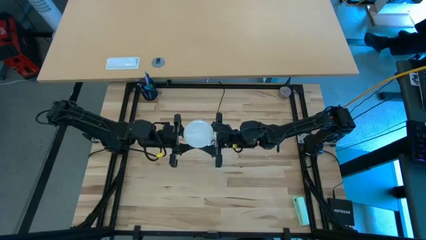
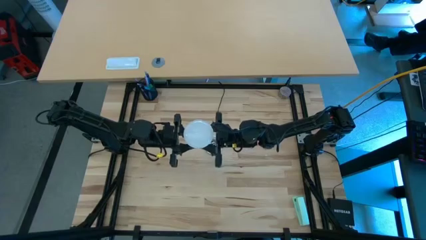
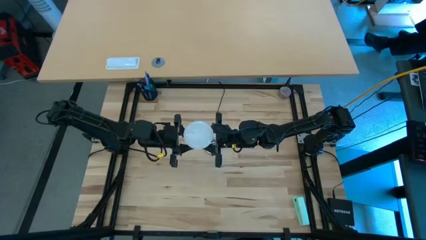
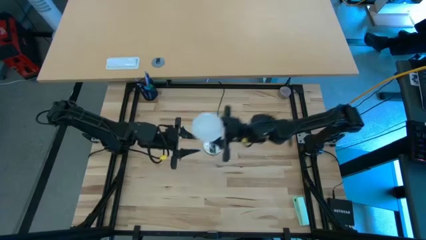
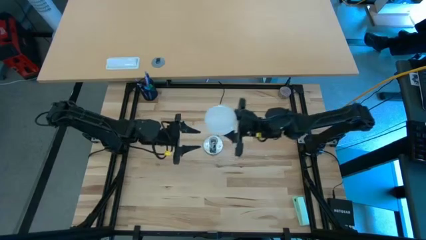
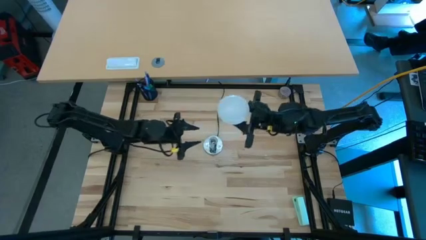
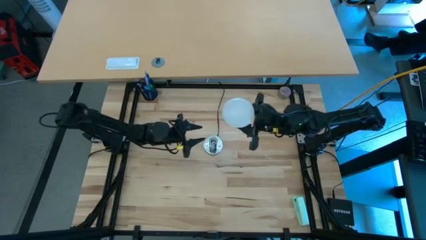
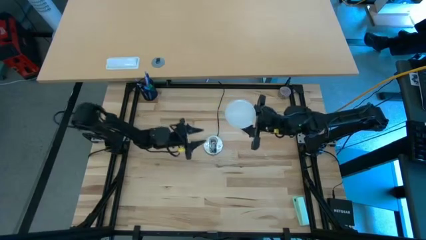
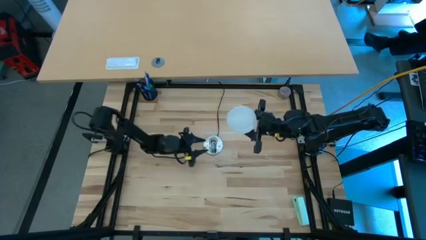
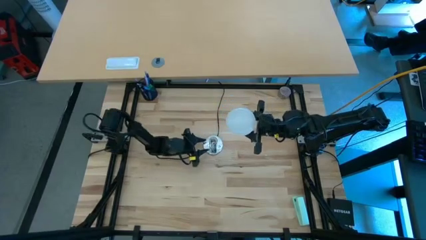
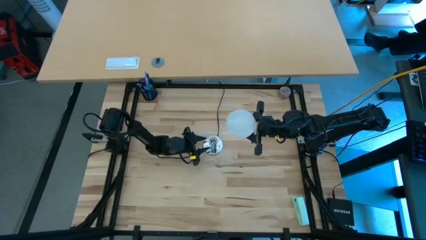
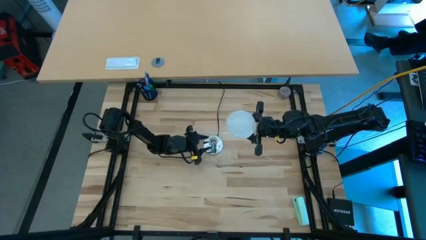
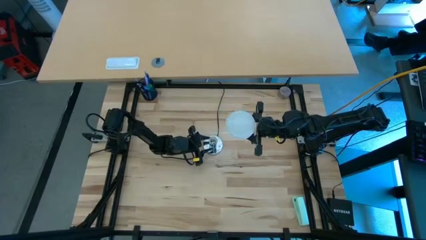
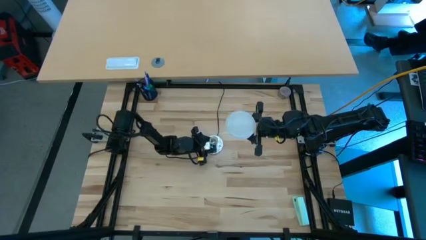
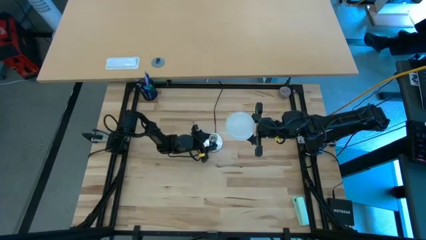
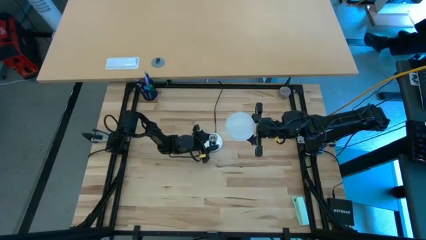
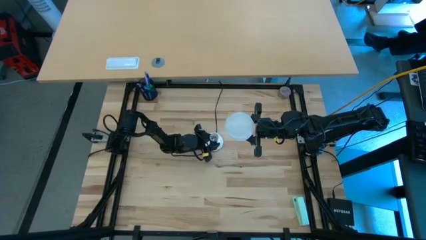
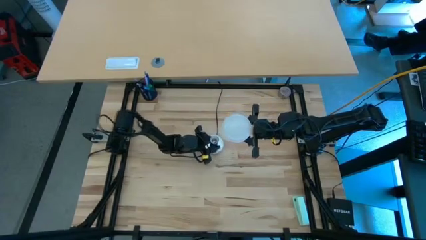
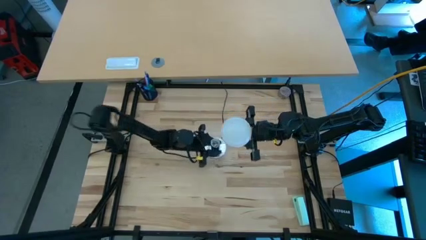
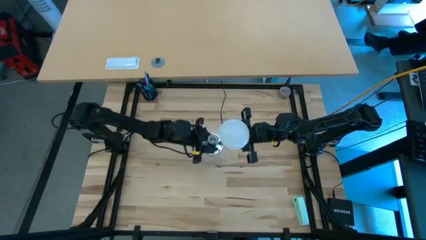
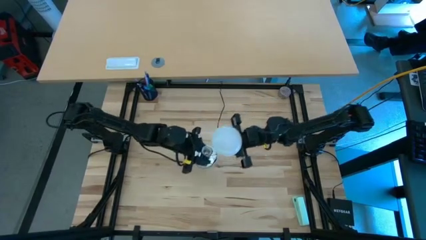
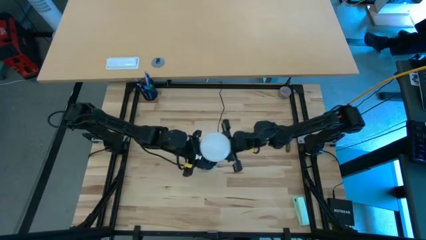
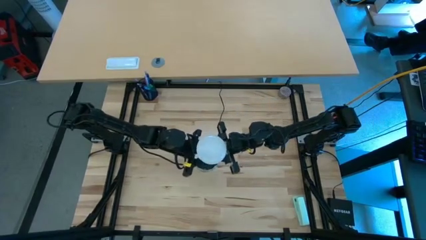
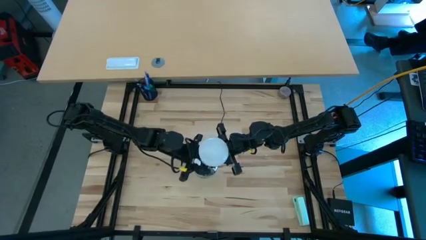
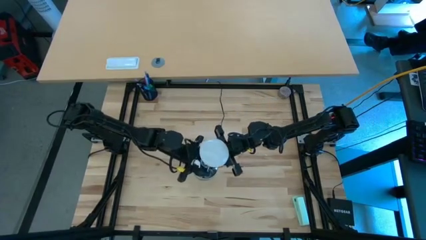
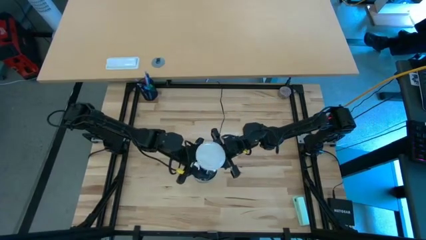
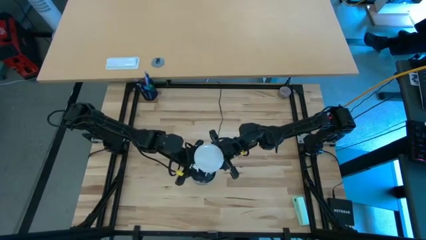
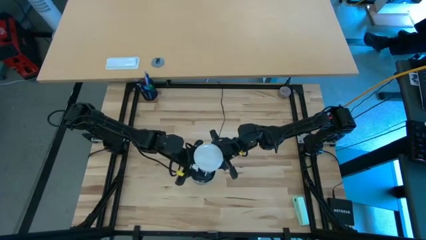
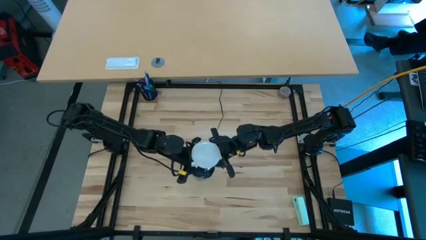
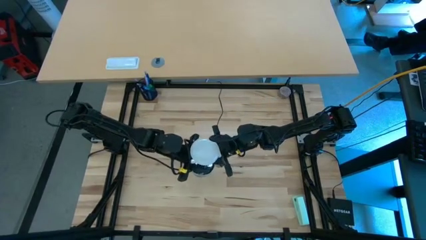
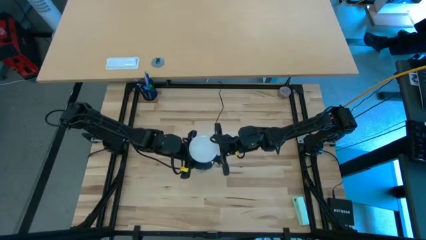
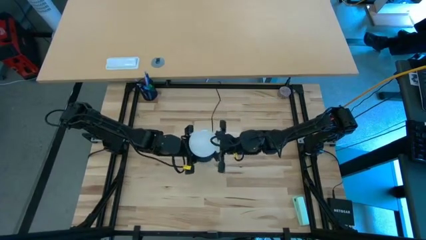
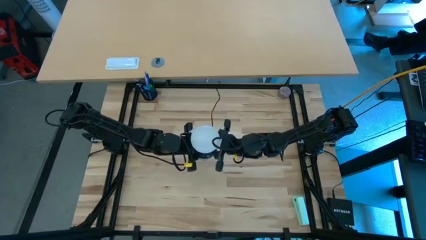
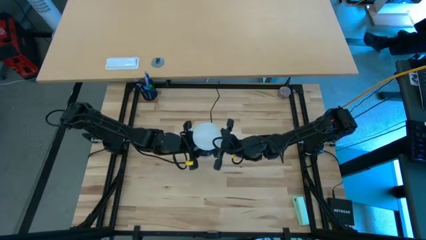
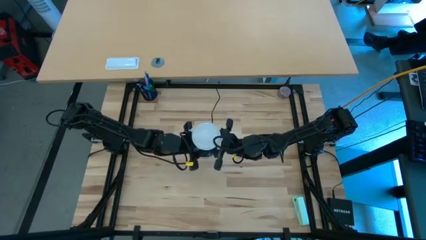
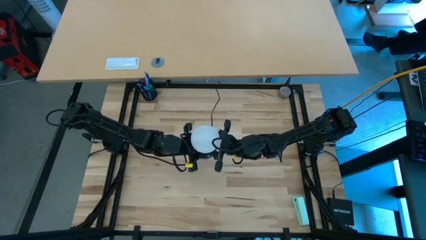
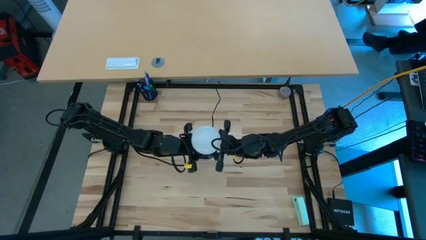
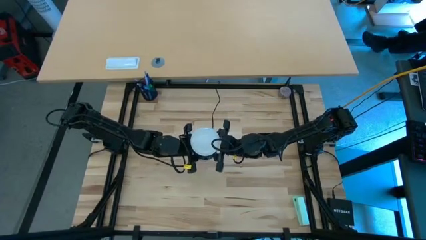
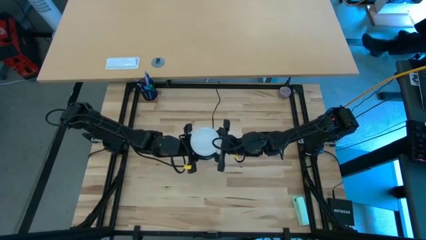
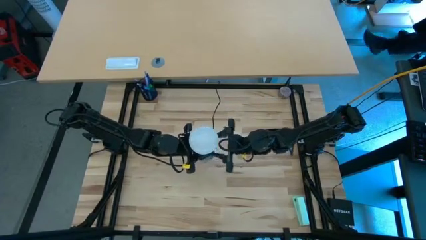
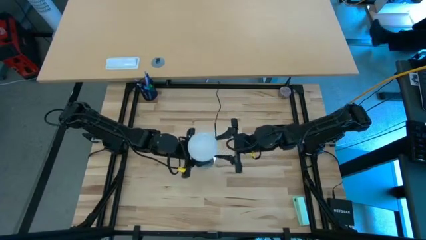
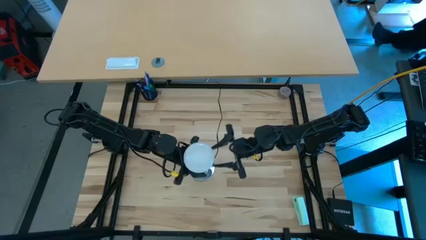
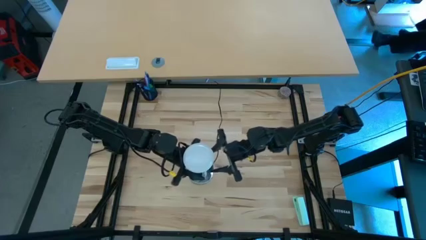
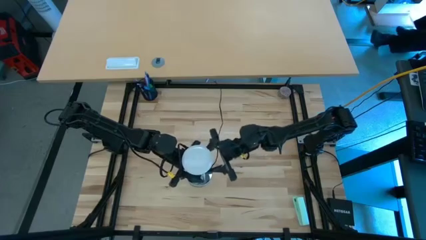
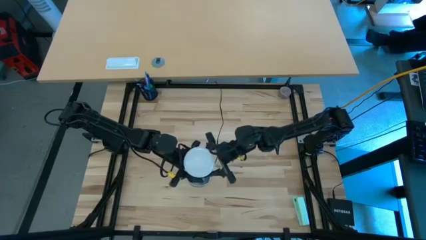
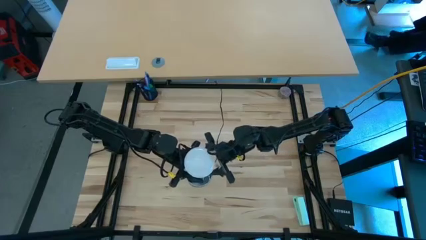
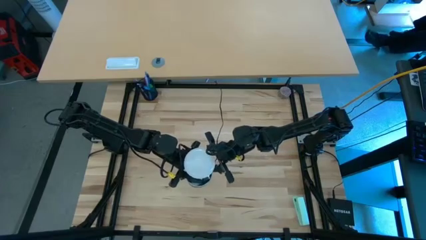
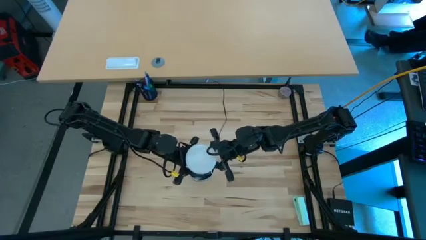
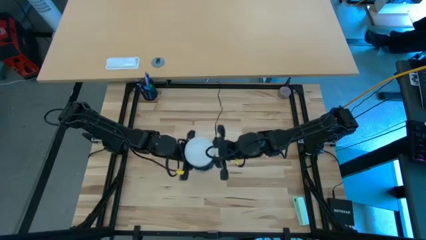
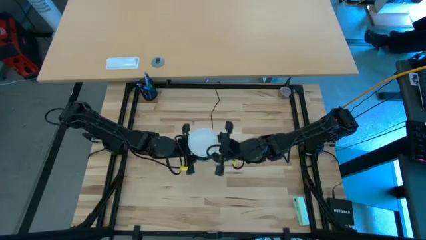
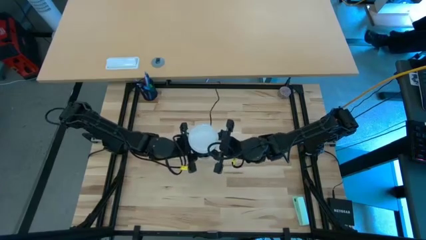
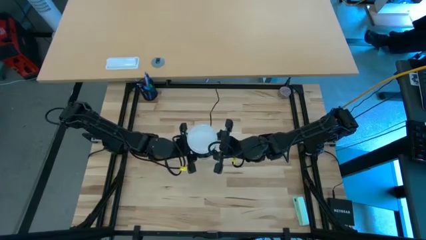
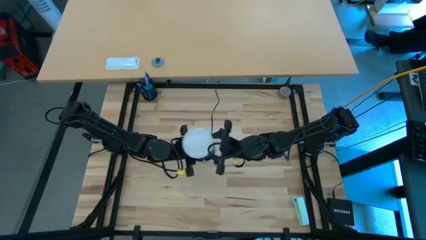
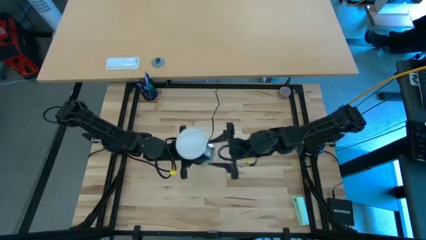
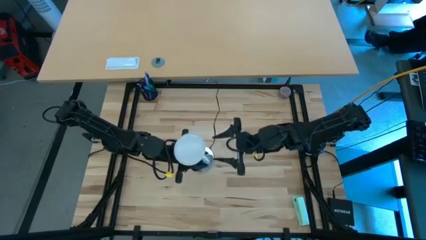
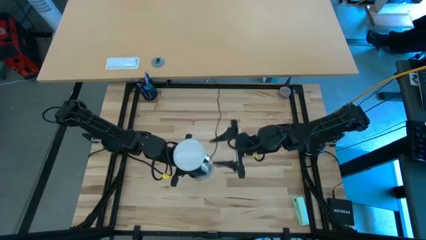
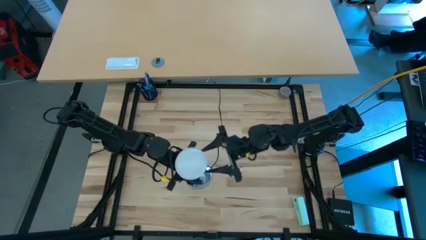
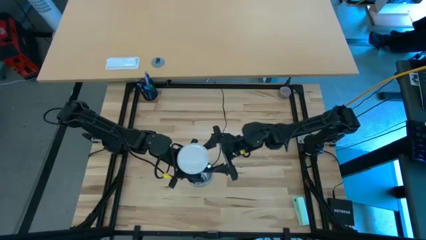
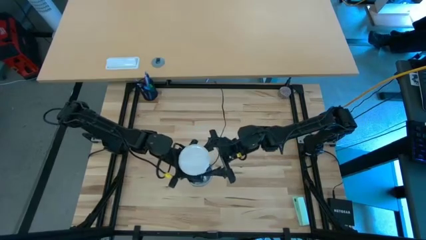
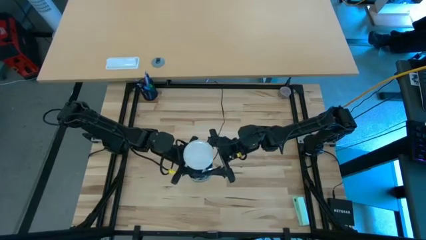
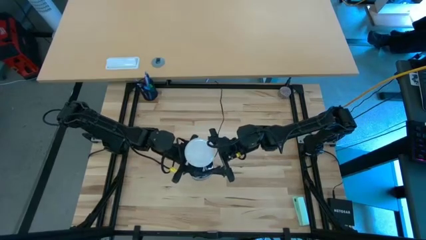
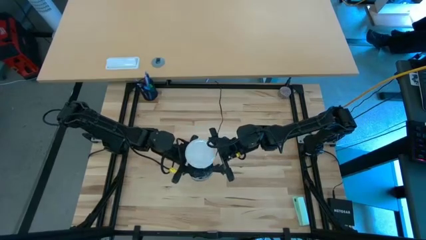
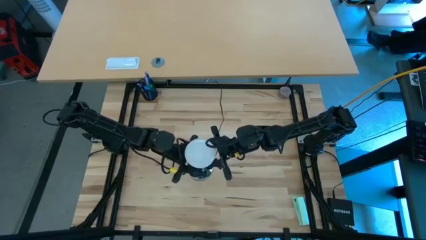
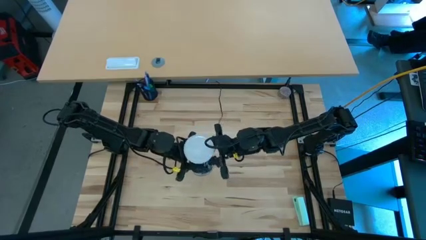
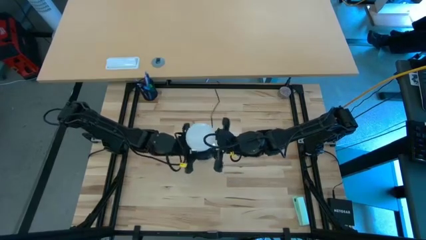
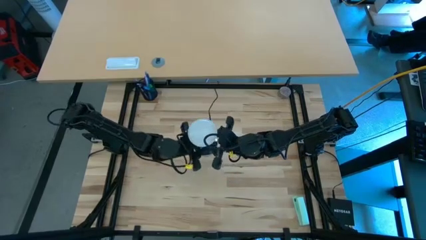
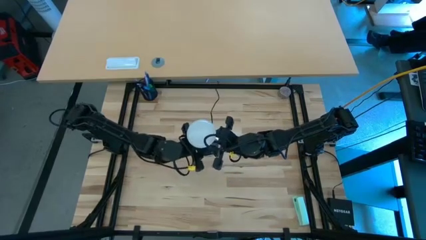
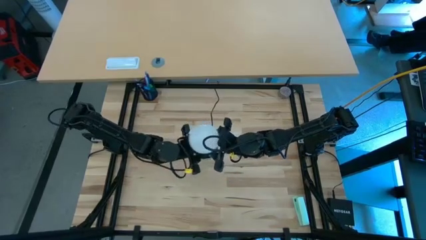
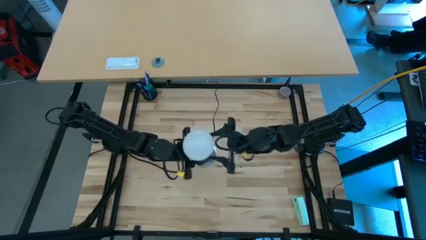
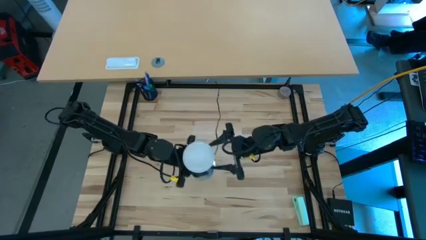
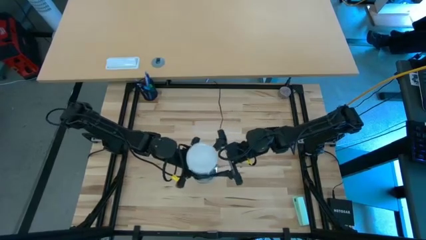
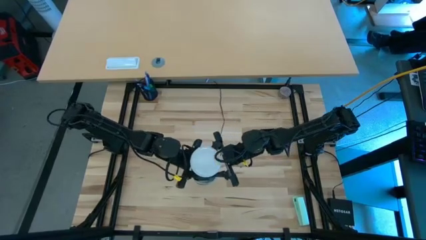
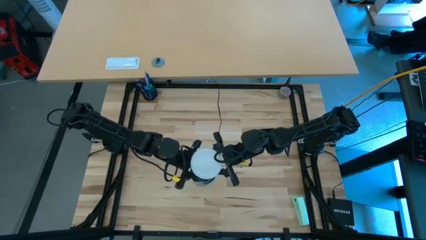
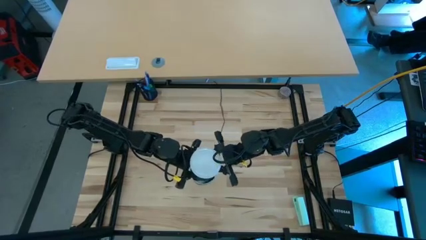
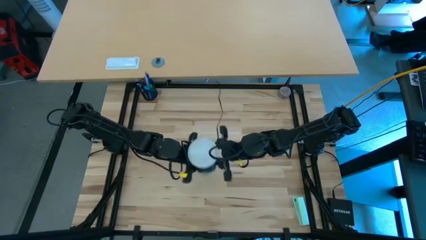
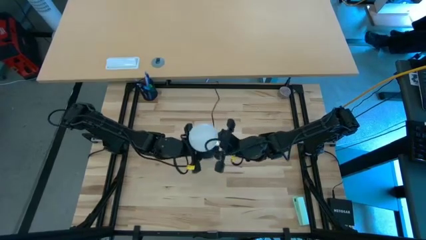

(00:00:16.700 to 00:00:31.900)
Task: Screw lightbulb
Insert the lightbulb into the lamp
